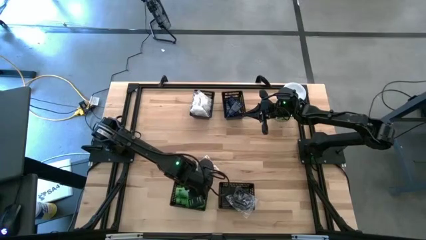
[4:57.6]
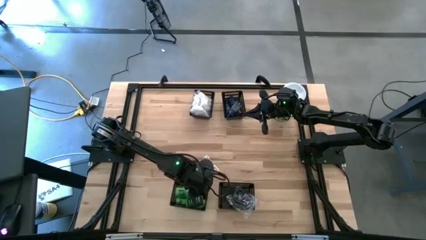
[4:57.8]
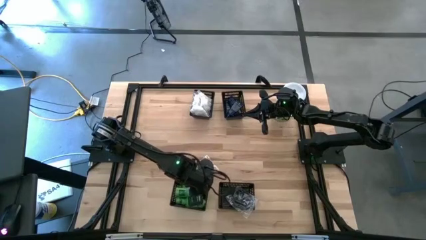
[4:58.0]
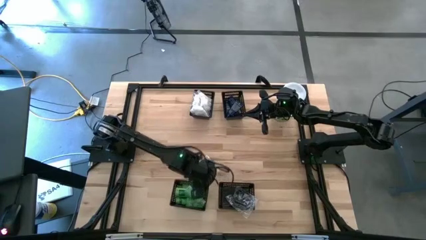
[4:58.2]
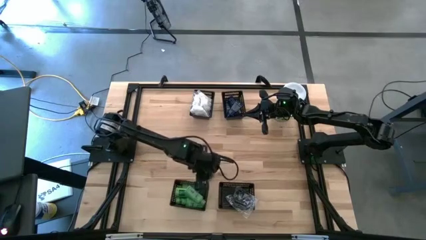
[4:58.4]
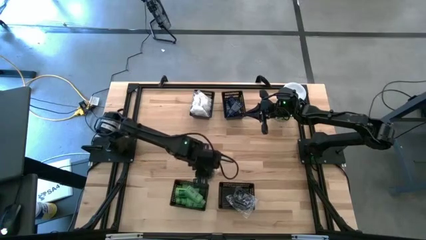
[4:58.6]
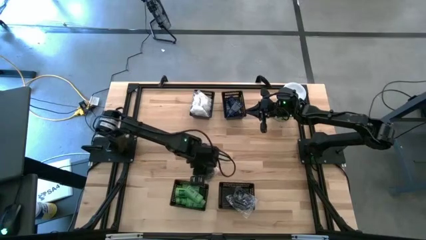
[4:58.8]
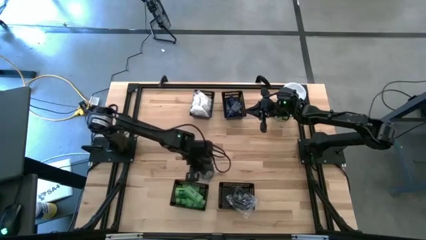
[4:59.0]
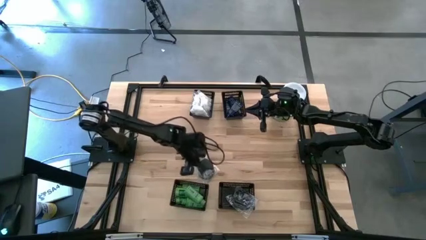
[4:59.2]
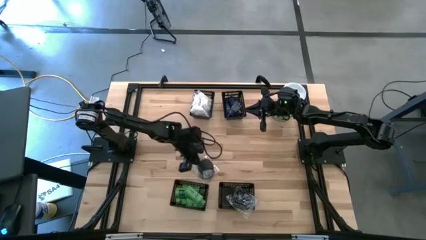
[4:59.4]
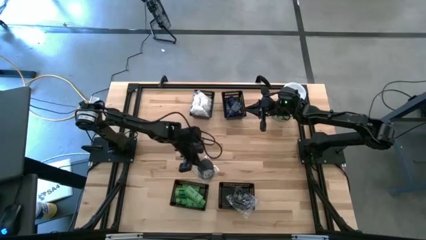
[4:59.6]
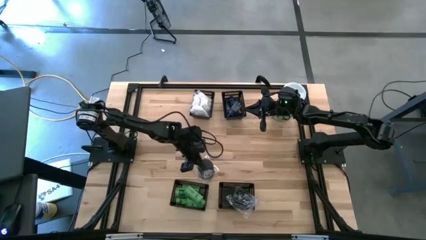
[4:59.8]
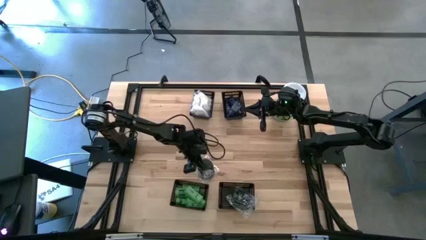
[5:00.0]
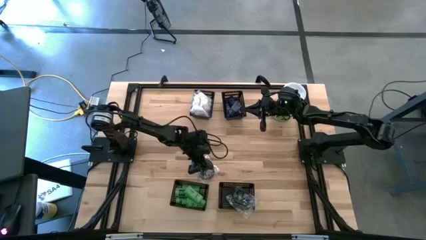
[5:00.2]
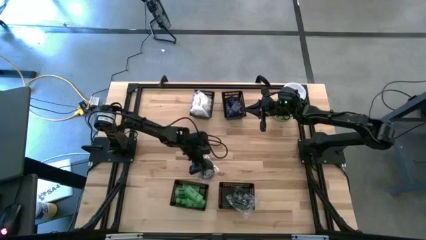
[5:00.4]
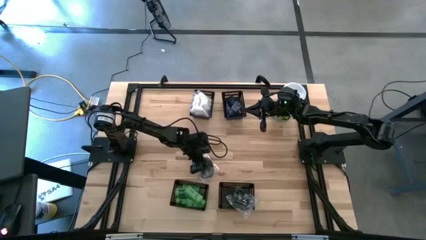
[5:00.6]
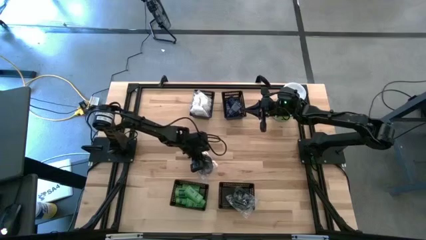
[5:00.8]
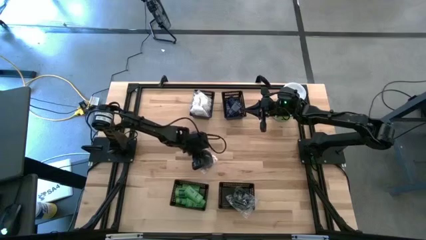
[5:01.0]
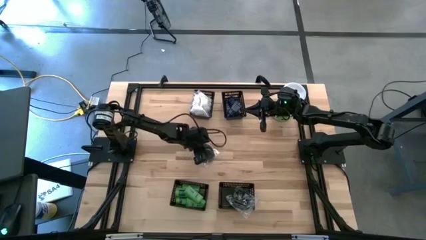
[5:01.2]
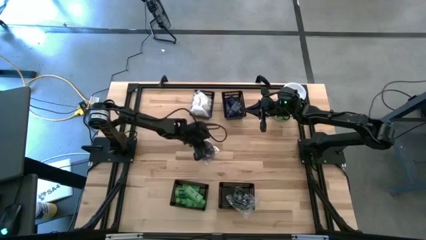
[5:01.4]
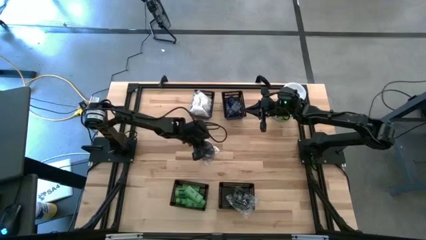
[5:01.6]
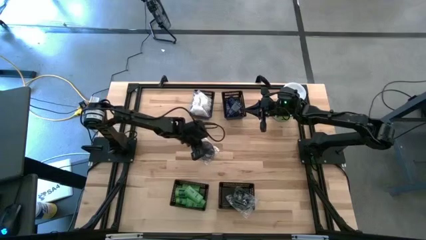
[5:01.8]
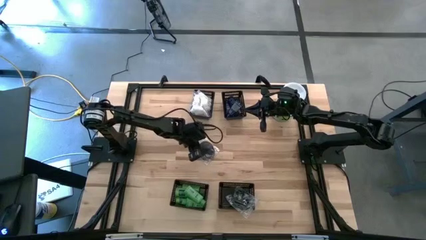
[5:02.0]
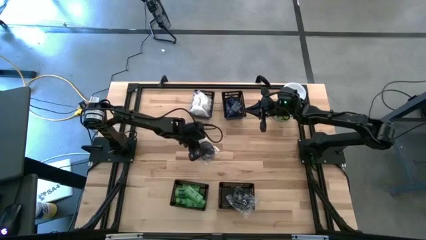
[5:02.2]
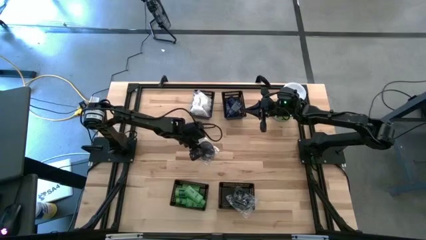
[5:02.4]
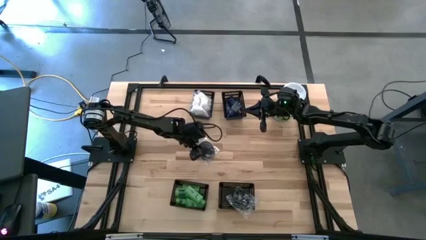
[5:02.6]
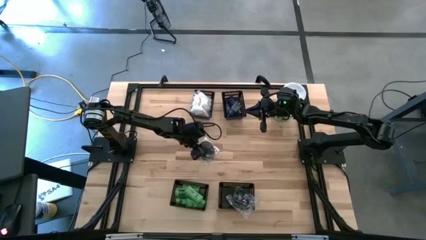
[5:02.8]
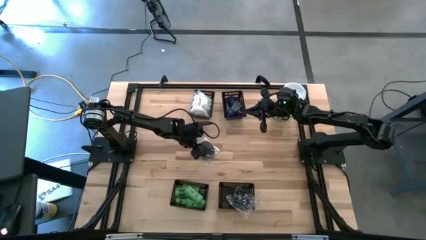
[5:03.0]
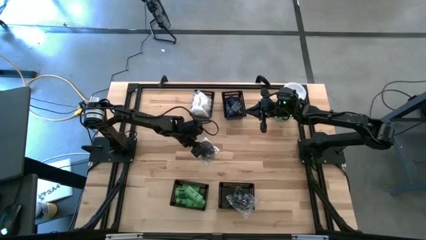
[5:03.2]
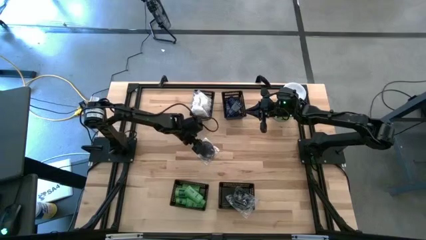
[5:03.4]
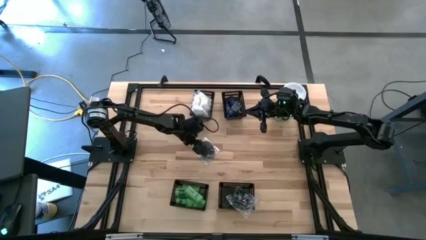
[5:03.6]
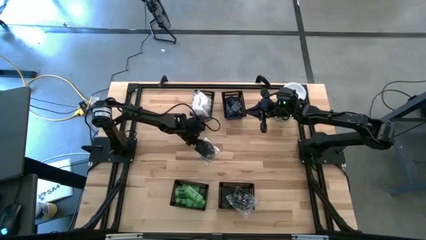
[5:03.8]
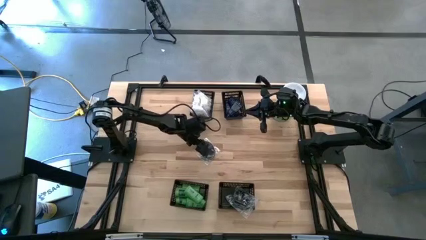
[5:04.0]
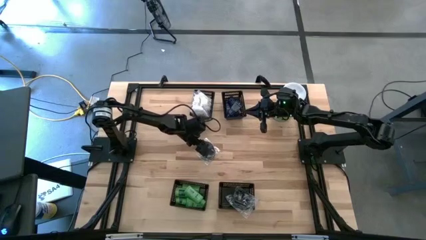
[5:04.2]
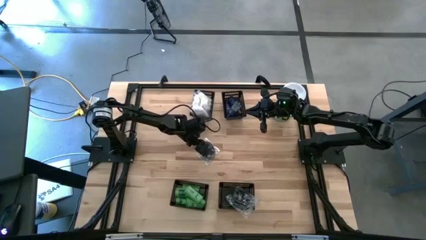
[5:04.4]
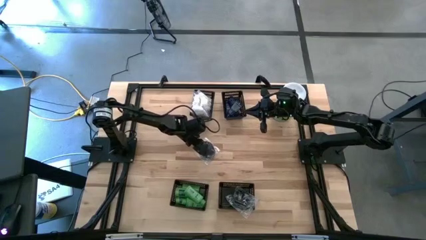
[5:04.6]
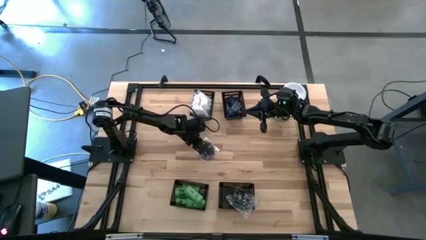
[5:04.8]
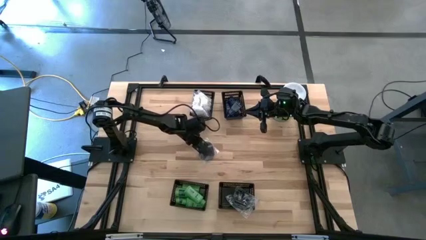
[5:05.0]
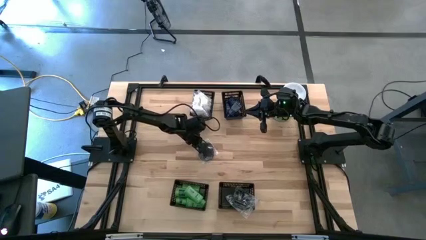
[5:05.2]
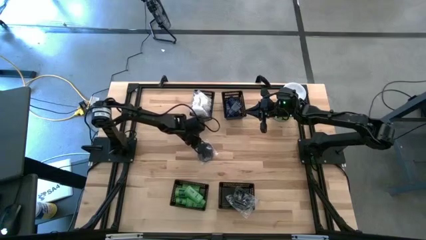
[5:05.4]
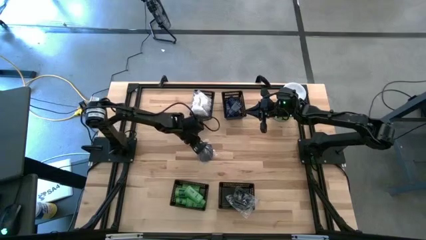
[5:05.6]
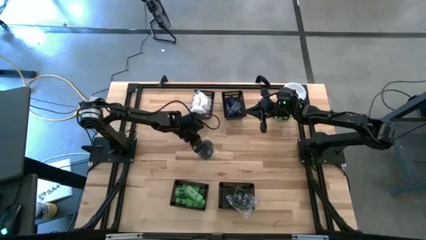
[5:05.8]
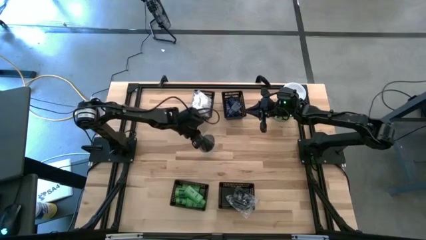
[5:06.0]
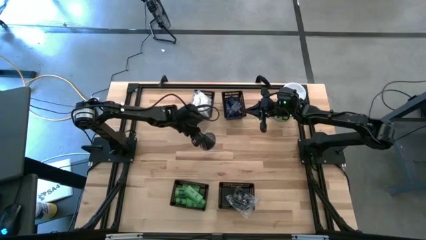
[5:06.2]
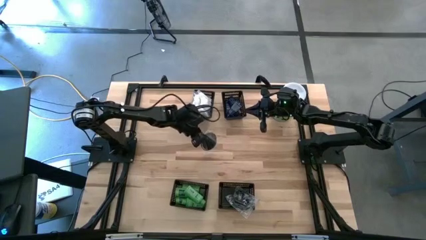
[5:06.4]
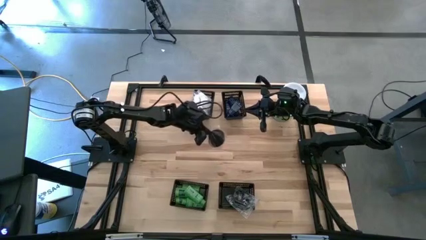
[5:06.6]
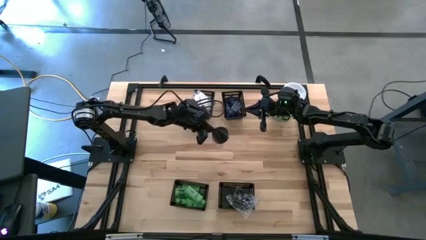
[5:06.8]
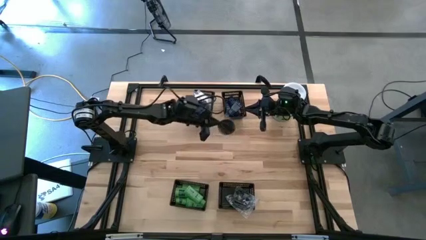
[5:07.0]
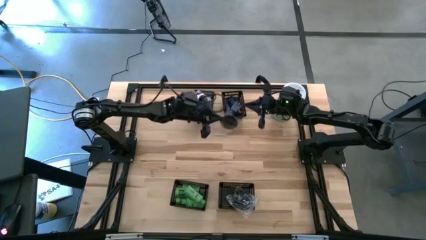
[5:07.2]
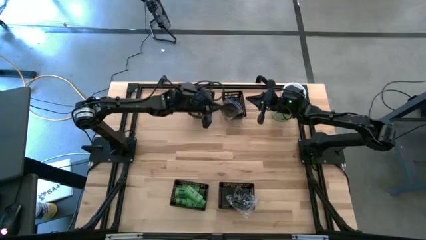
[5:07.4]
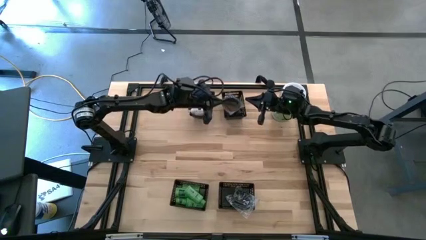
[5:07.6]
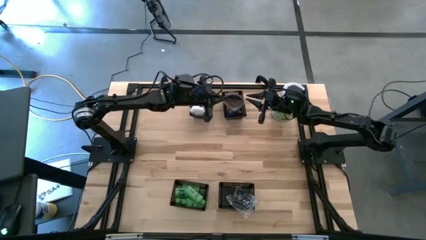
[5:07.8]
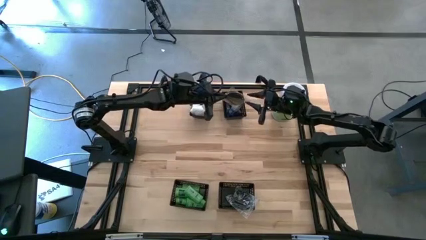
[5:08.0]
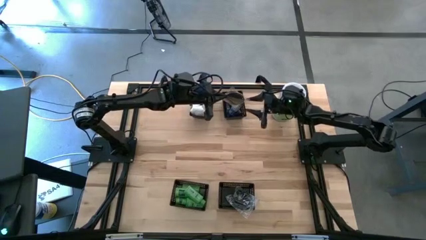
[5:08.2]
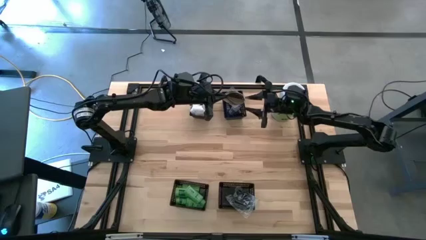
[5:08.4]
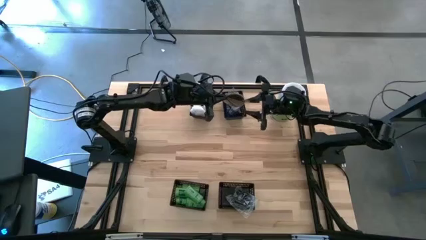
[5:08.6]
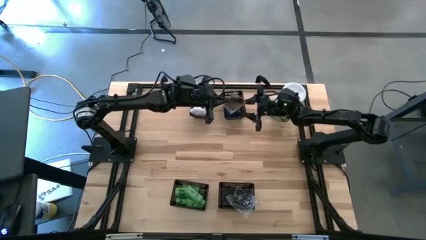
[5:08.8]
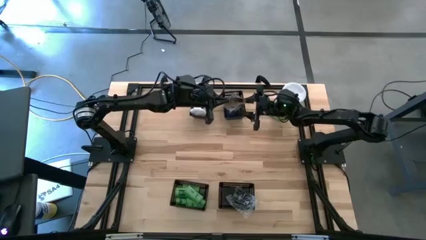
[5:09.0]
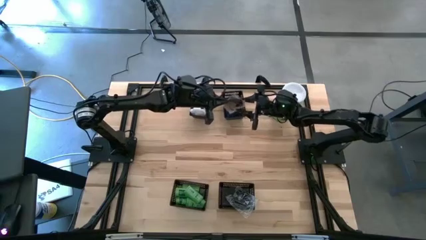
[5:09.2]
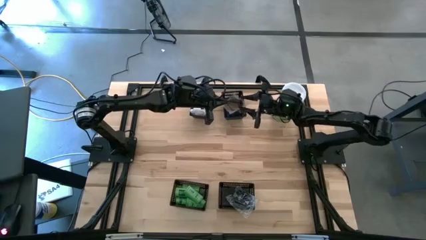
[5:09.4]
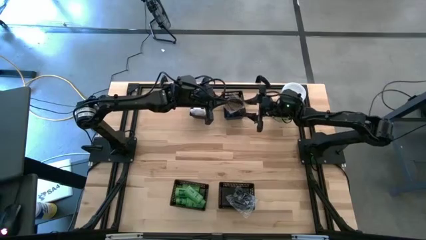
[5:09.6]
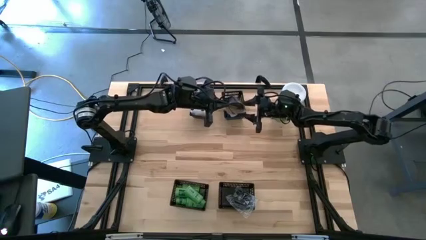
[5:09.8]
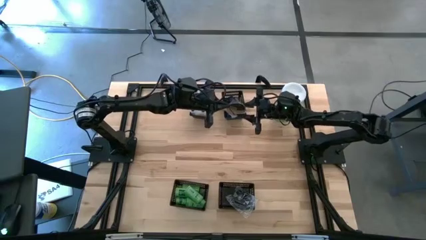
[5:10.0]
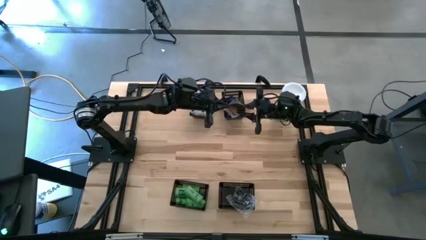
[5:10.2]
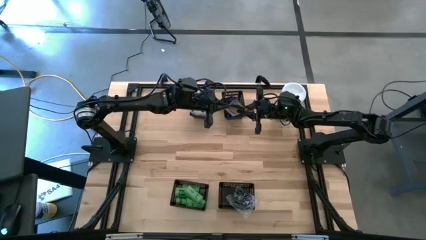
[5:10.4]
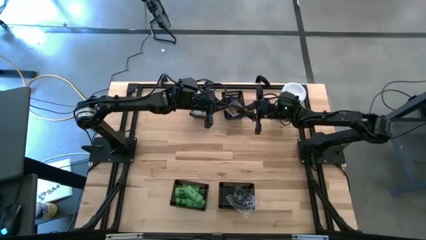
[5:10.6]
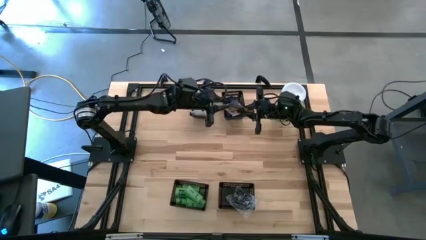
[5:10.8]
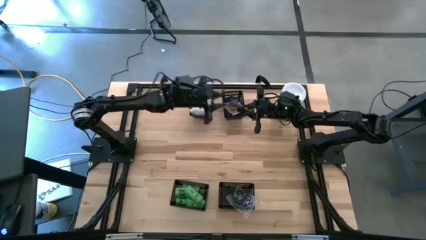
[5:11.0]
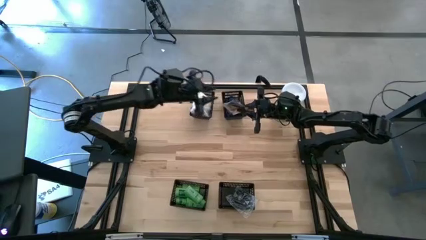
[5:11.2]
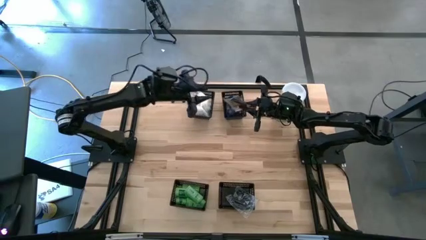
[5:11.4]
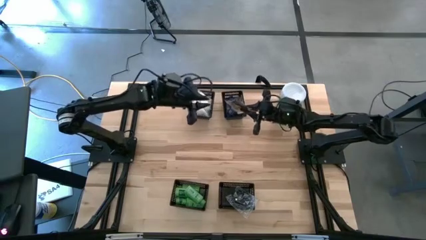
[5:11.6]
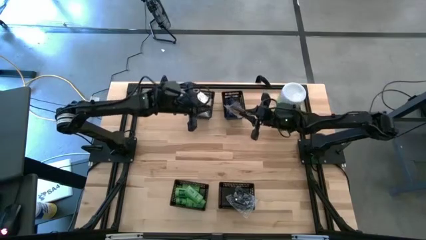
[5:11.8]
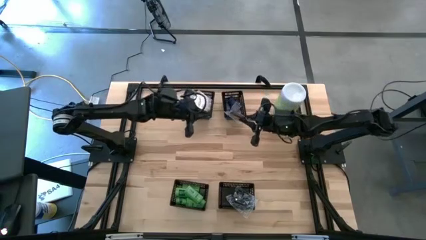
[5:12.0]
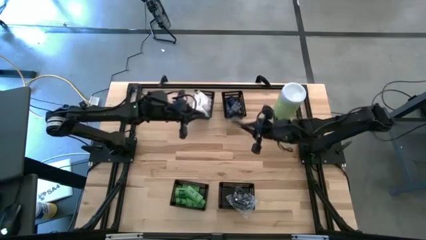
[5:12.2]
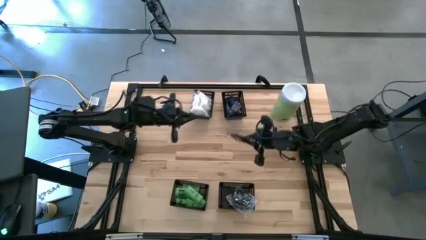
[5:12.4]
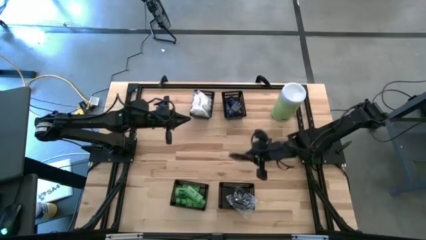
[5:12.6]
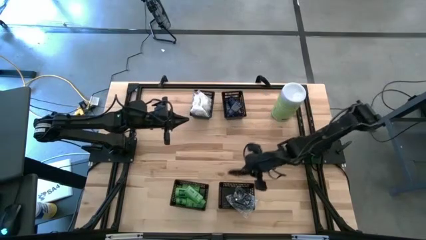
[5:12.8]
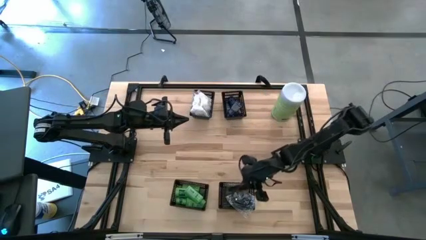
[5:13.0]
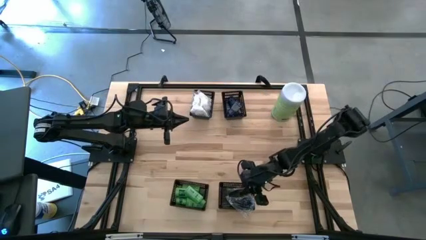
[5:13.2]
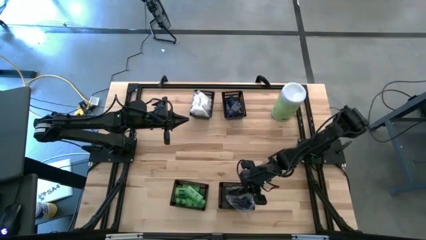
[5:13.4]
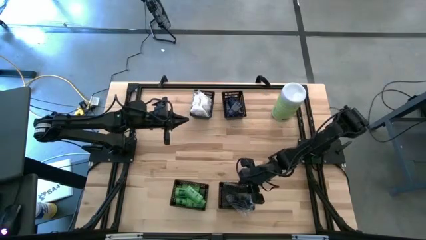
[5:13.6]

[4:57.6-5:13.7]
Task: Pick & Place Travel size toiletries
Put the black hairbrush into the bottom right black bin
